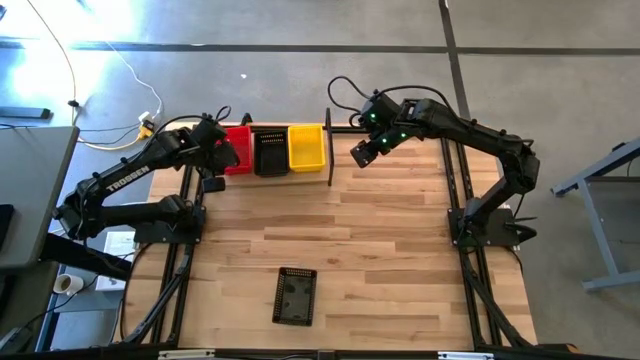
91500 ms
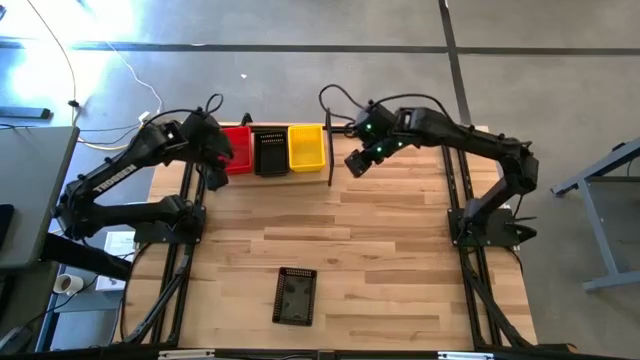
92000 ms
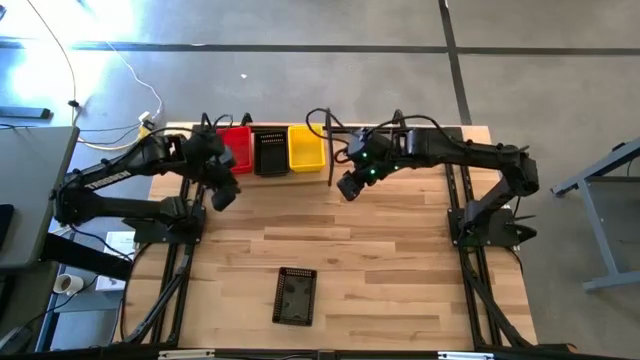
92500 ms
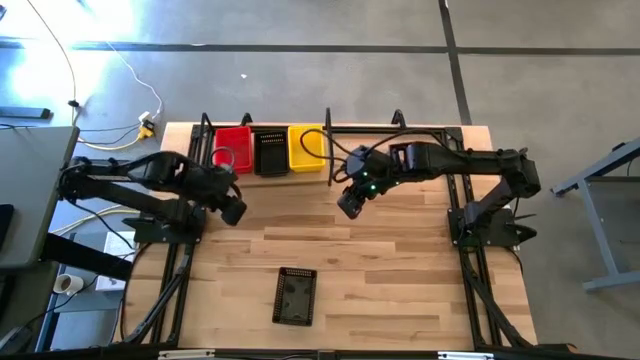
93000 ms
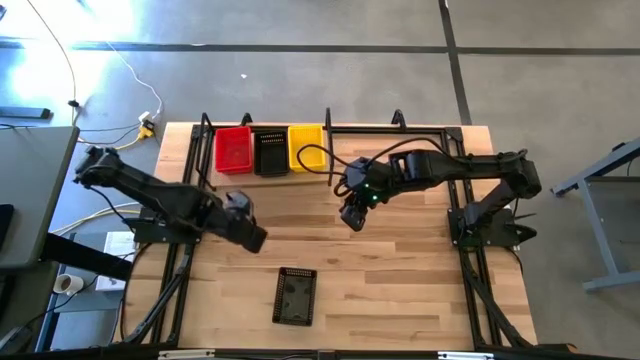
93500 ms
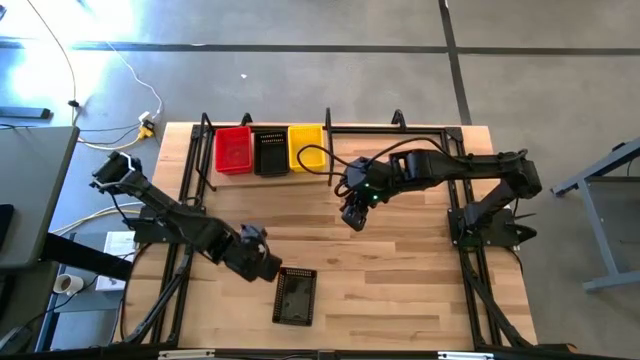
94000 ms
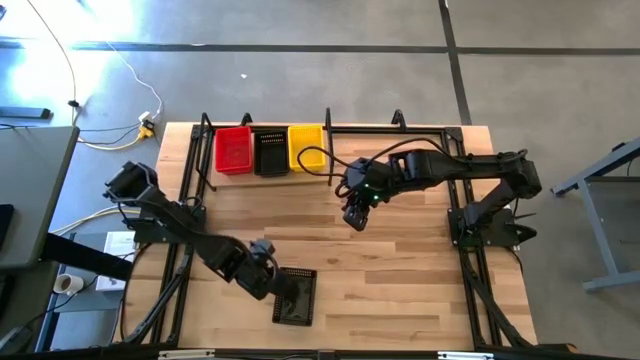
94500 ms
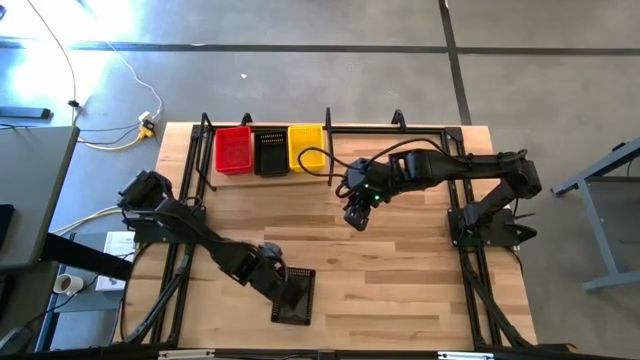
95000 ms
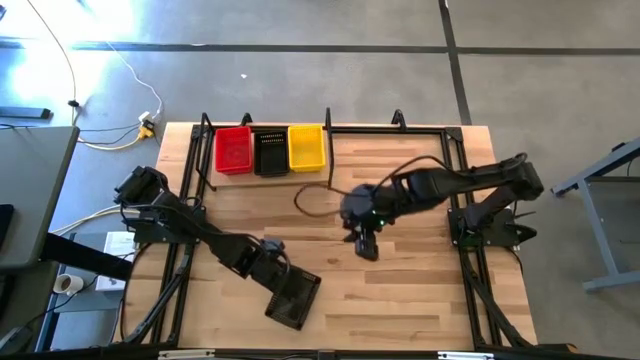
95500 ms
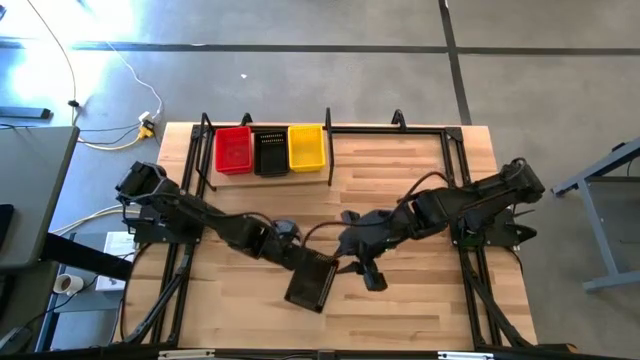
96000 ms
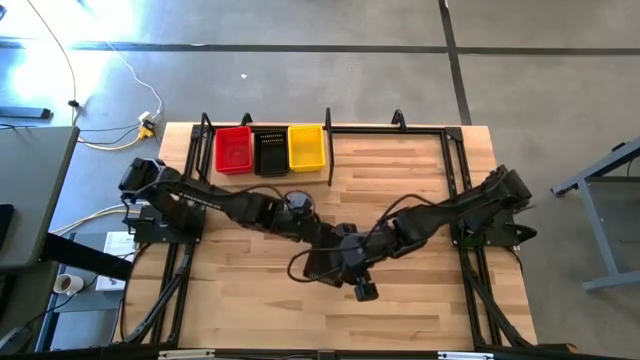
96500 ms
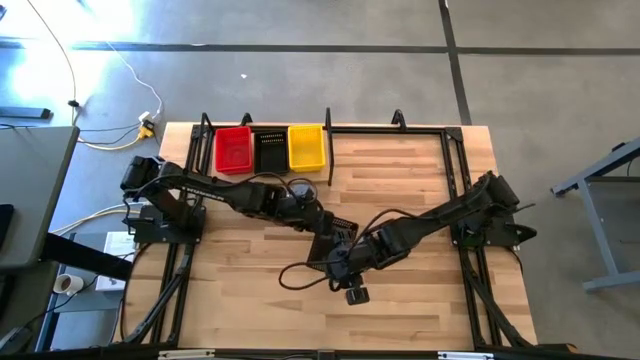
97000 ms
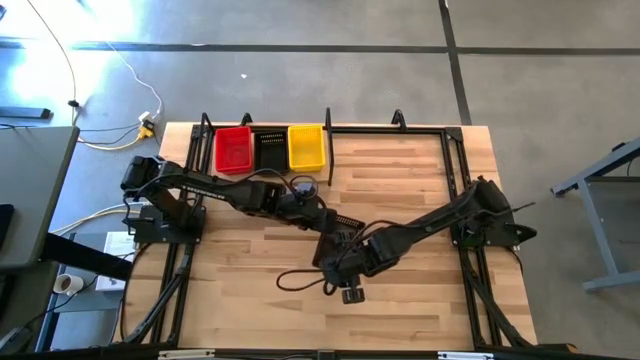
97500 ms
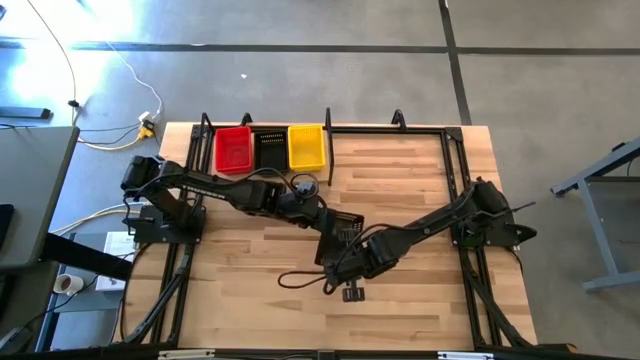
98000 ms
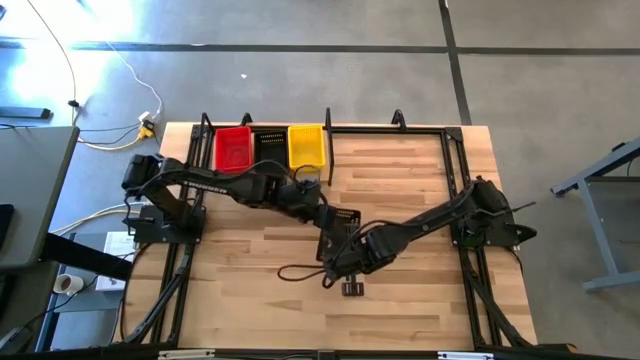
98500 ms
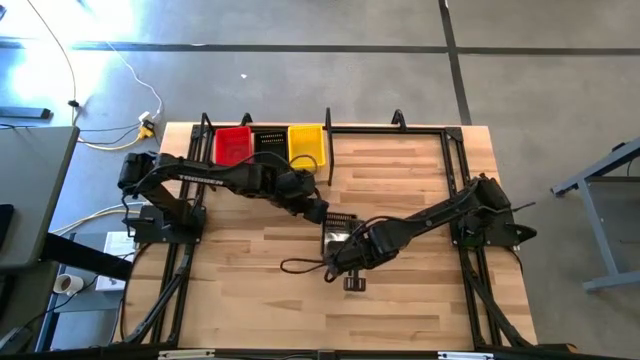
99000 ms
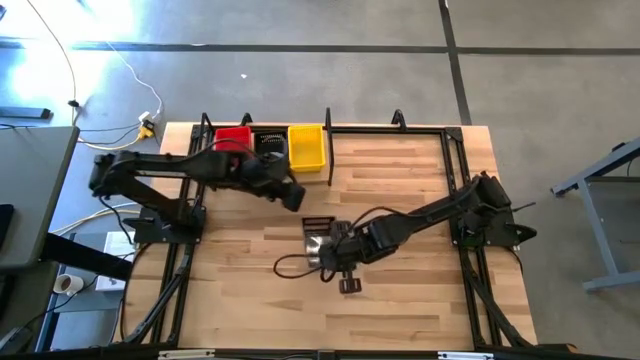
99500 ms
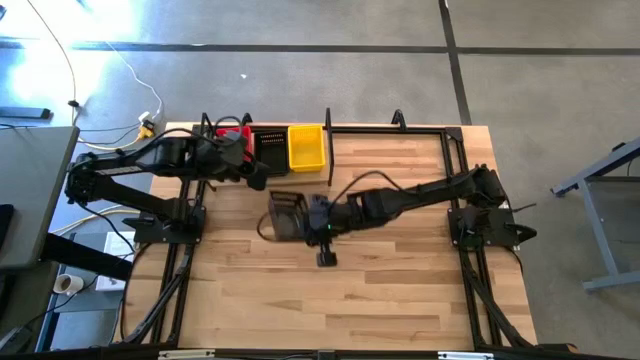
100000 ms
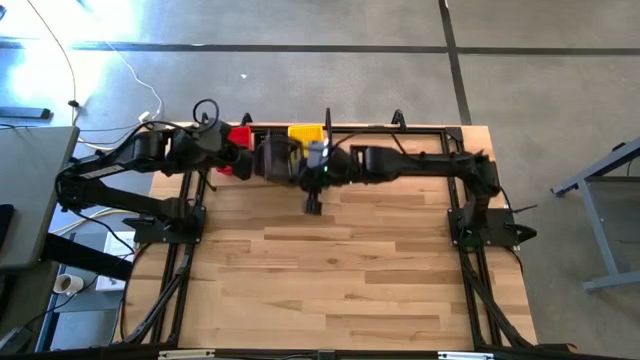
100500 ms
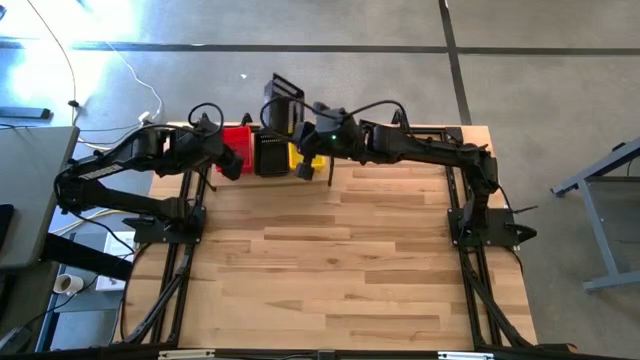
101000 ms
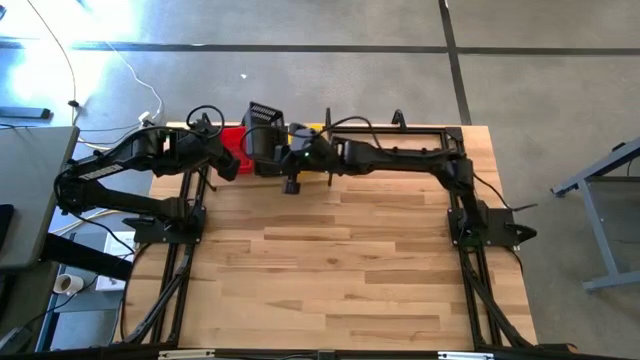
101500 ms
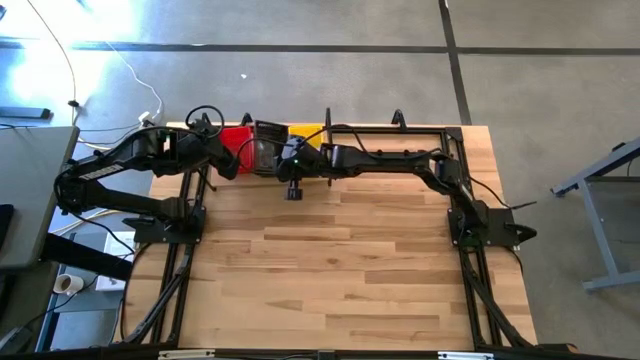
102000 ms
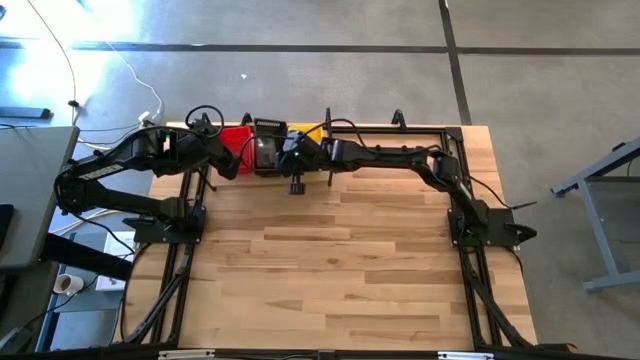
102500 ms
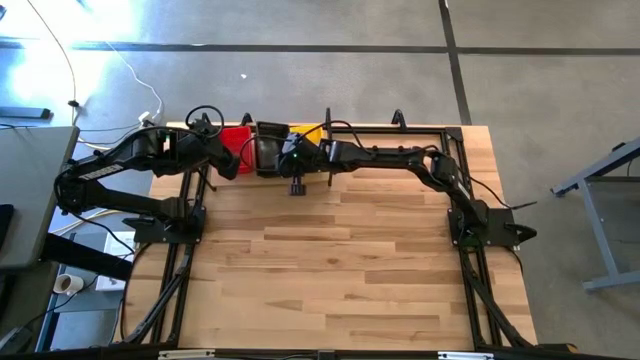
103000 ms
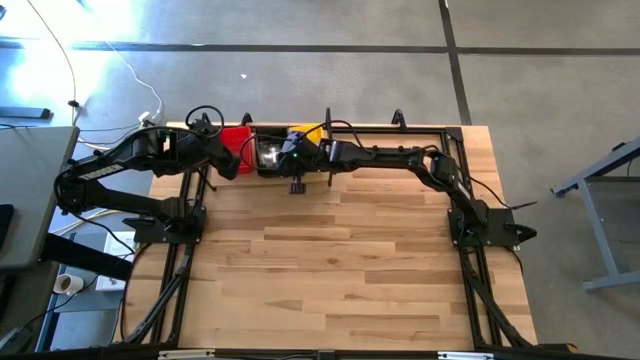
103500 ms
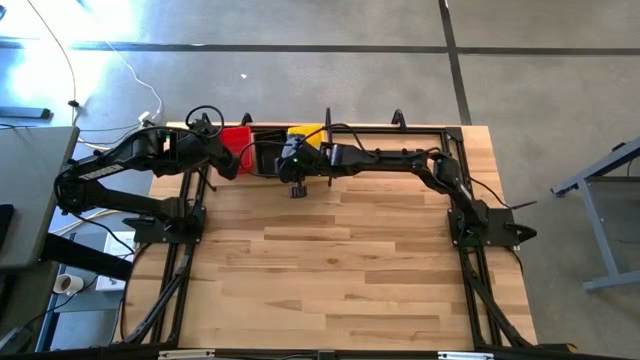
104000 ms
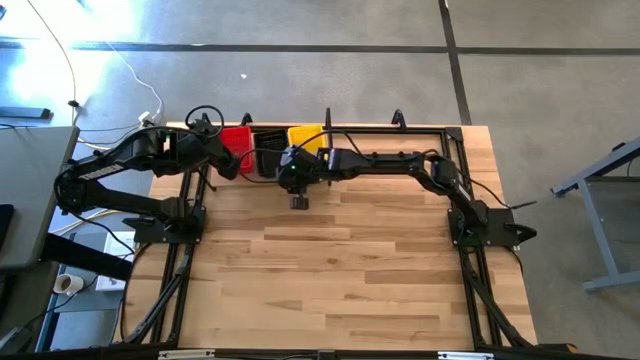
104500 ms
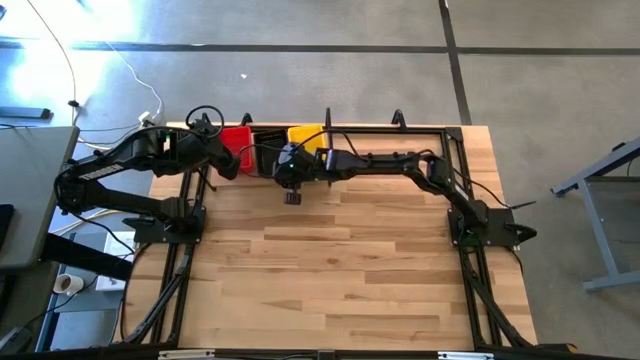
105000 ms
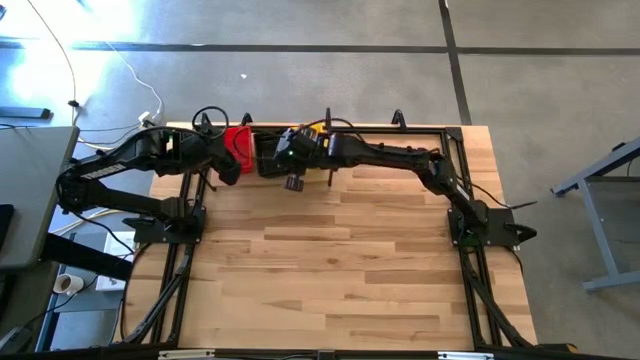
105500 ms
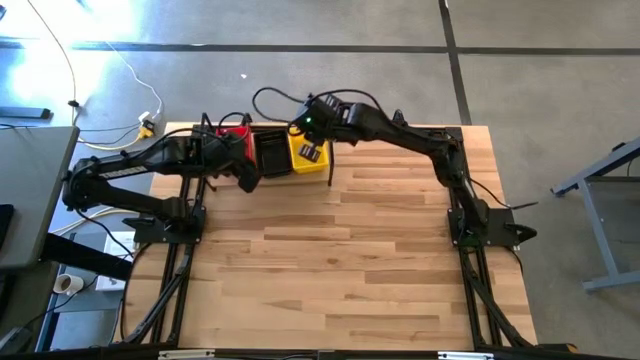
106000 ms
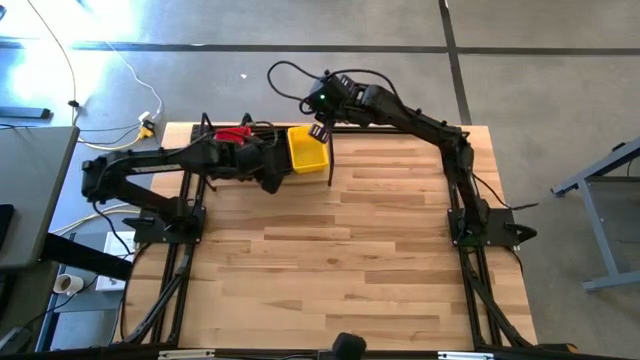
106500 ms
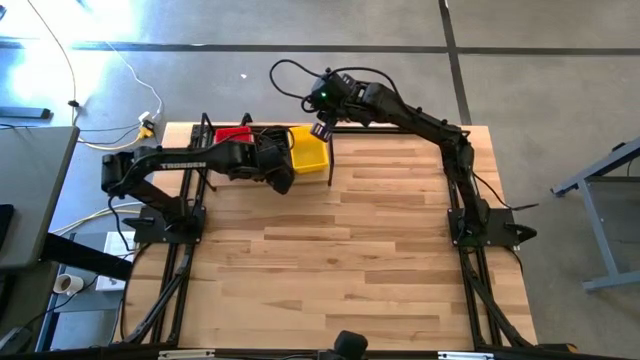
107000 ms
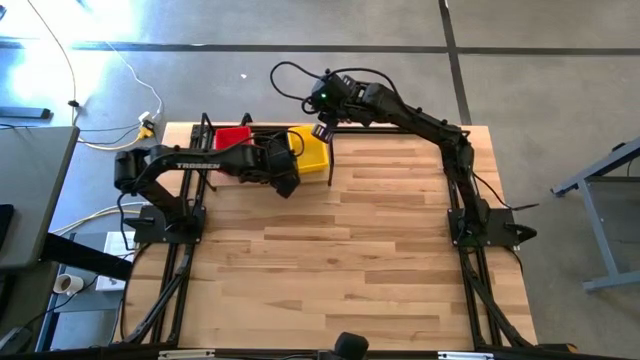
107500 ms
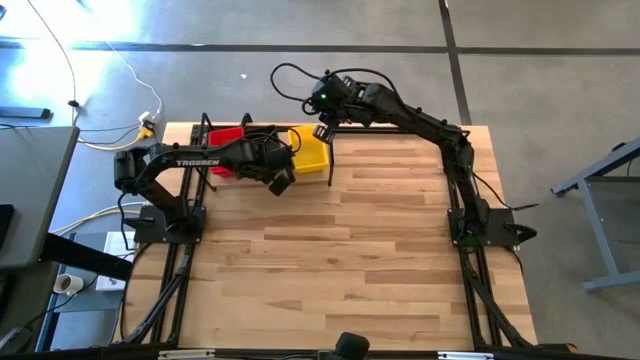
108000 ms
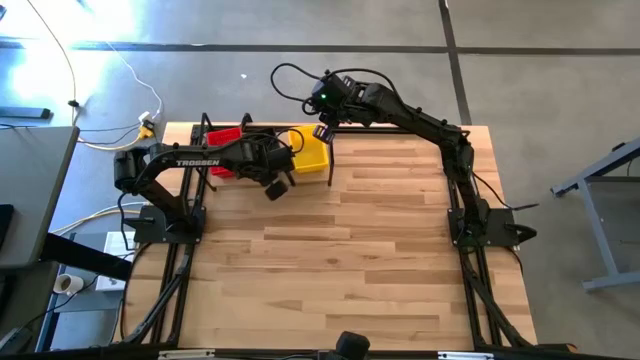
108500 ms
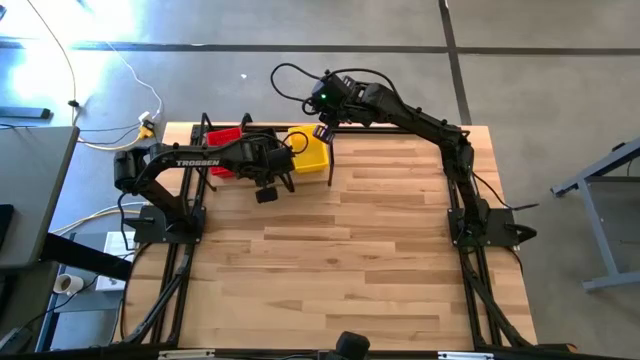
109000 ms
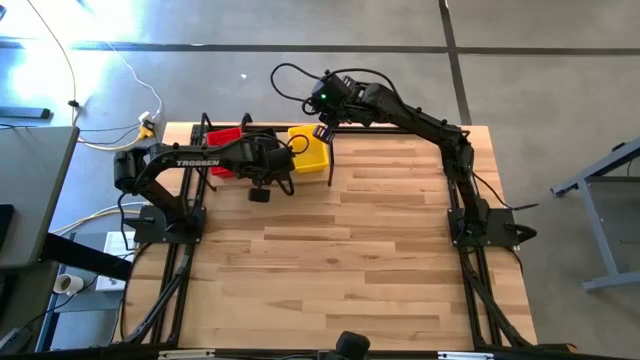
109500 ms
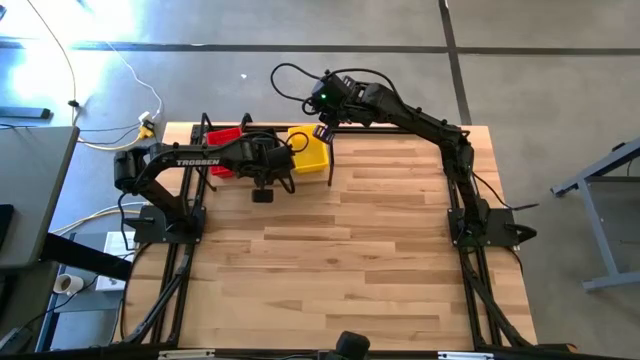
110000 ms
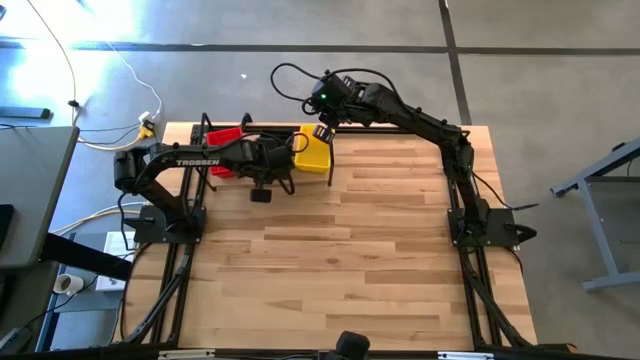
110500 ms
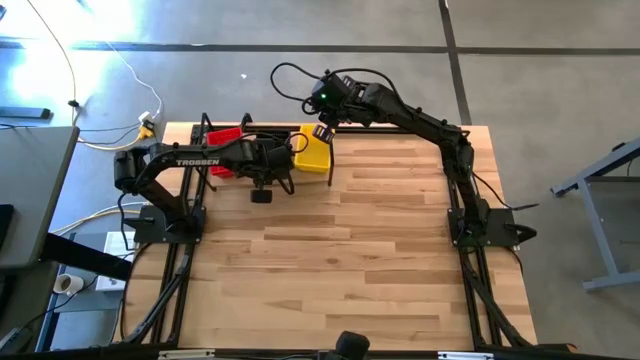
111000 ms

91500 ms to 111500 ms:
Task: Stack baskets on shelf by color
Stack the black bin on top of the black bin

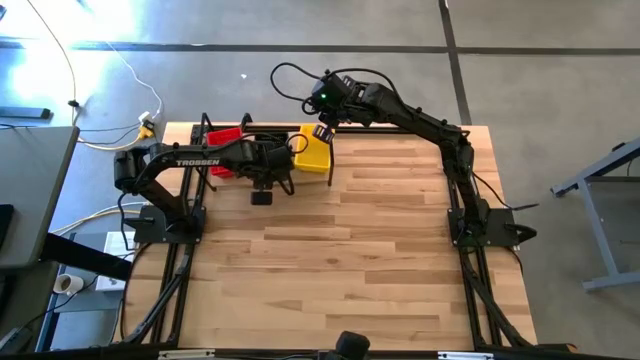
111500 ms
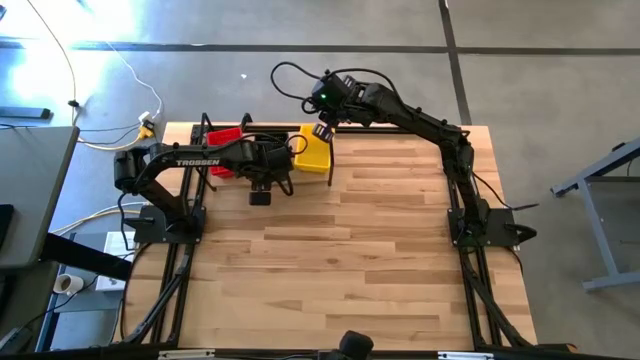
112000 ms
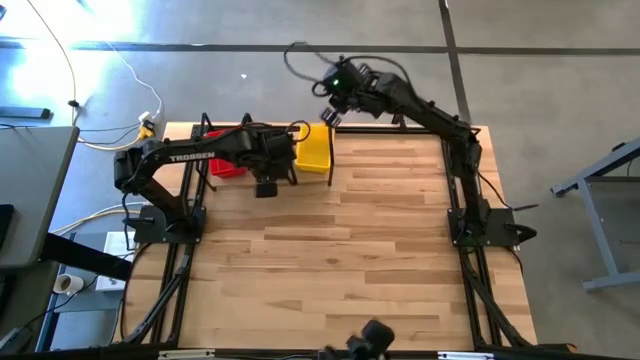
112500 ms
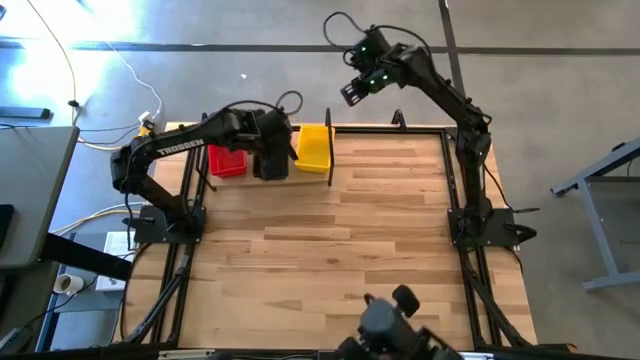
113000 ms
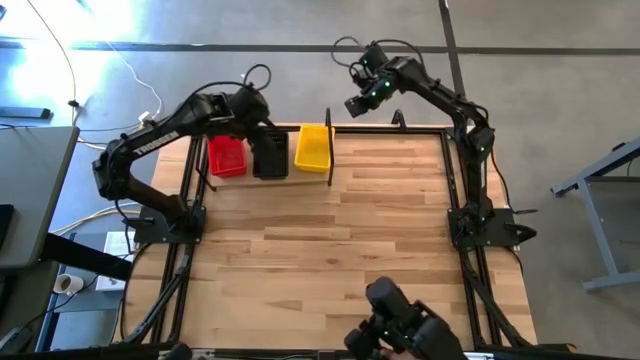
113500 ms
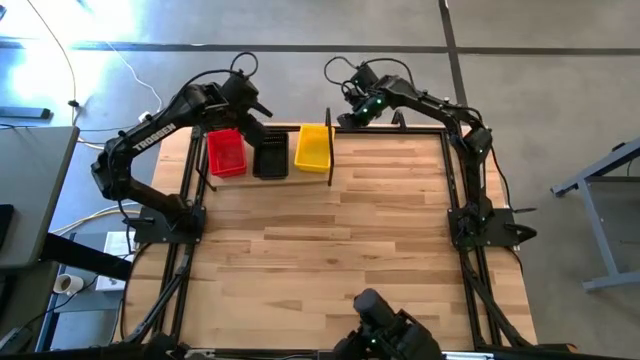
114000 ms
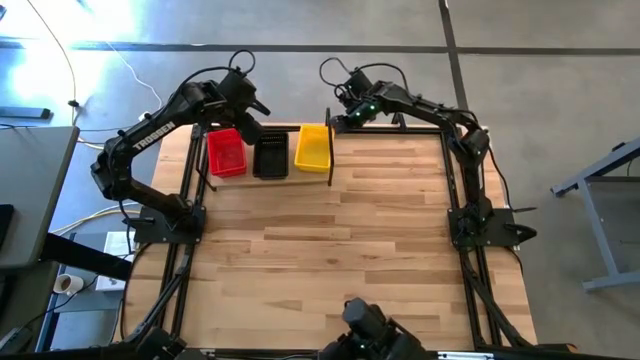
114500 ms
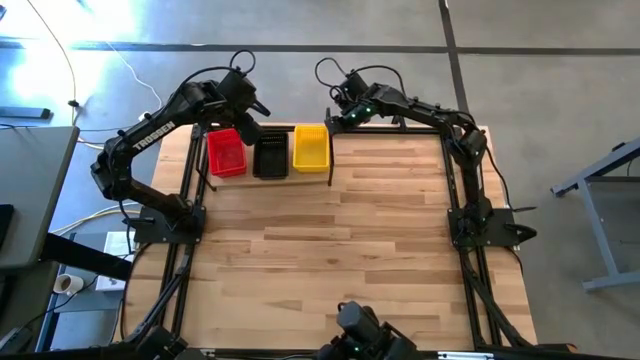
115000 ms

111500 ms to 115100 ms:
Adjust the stacked yellow bins on the shelf
